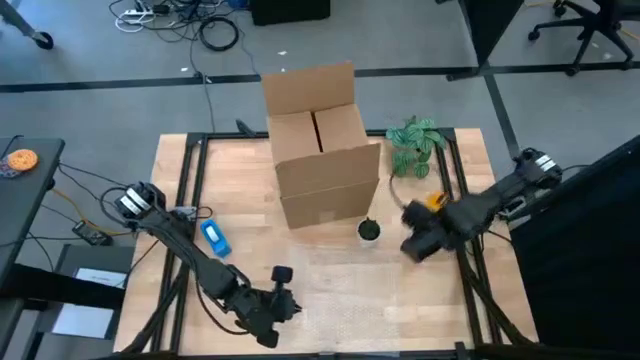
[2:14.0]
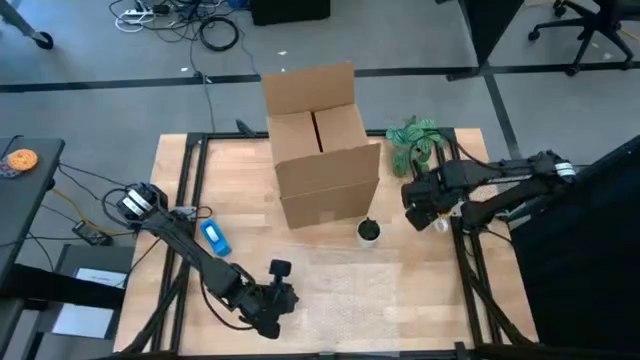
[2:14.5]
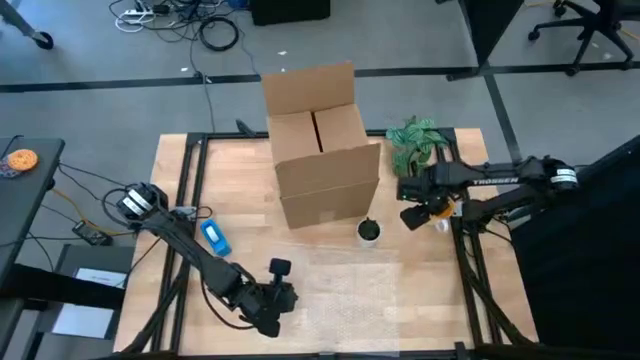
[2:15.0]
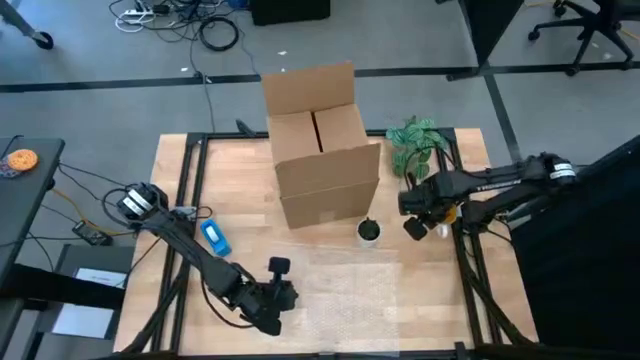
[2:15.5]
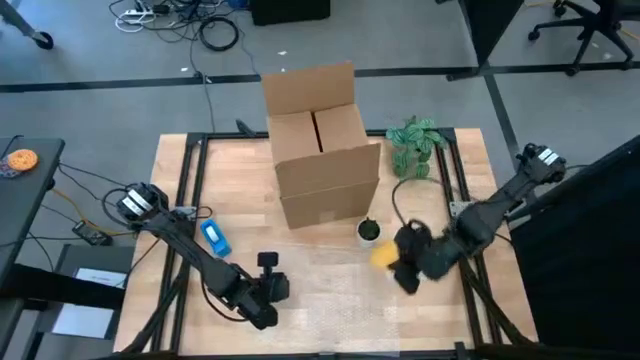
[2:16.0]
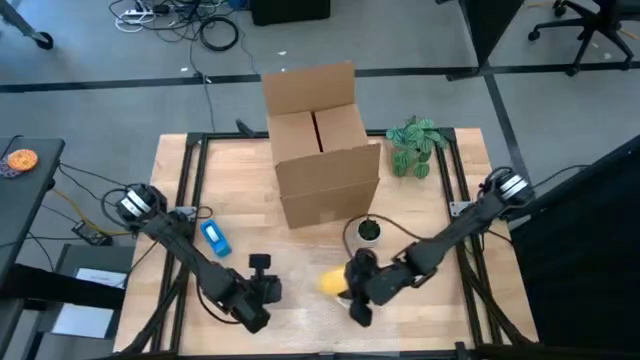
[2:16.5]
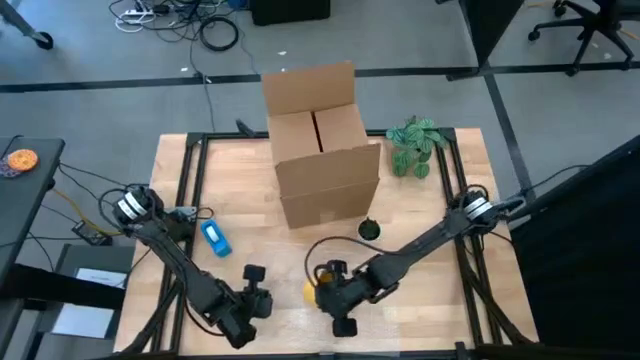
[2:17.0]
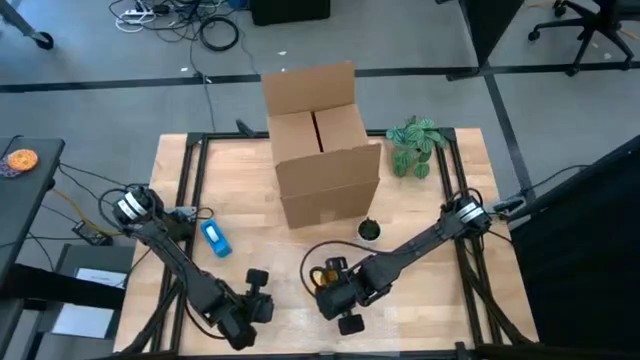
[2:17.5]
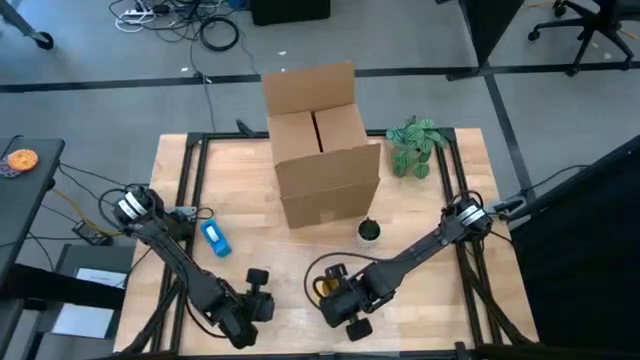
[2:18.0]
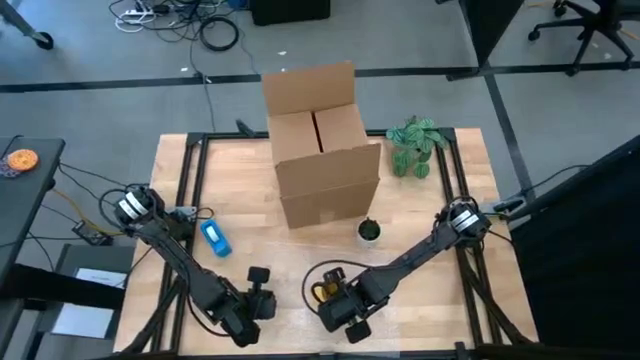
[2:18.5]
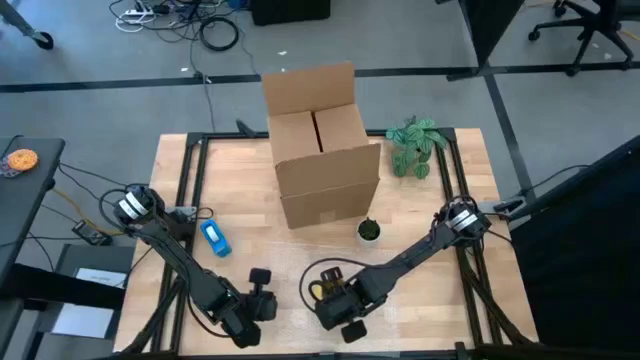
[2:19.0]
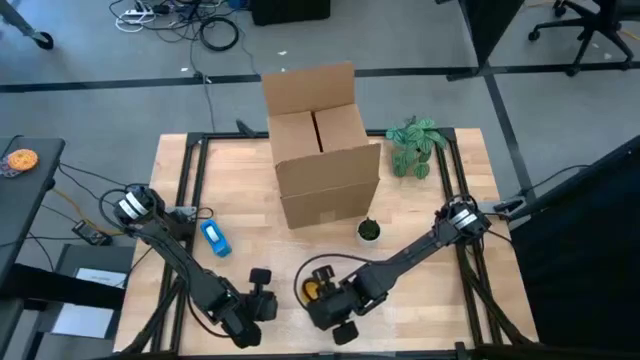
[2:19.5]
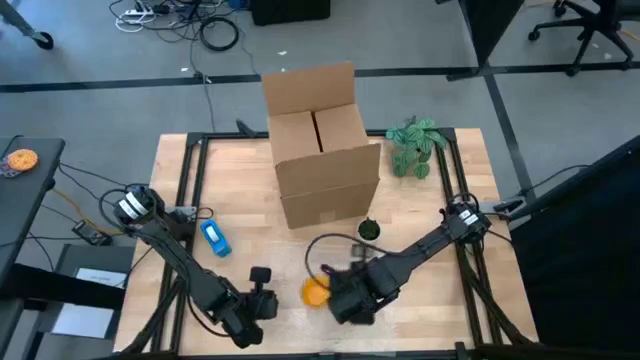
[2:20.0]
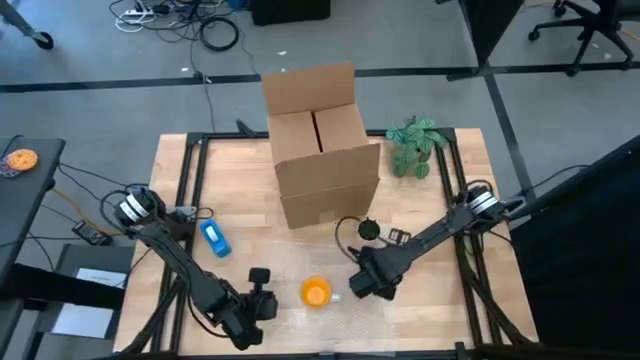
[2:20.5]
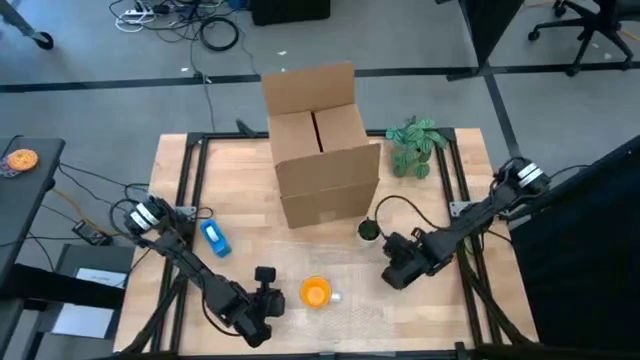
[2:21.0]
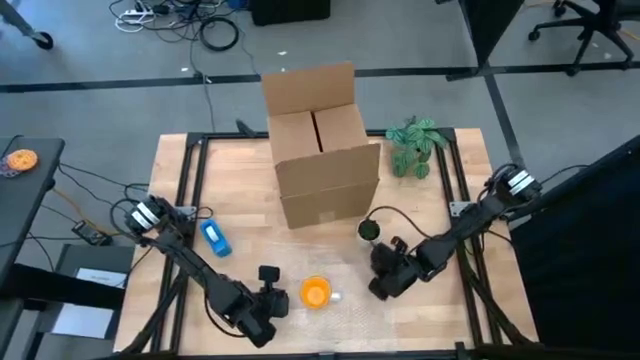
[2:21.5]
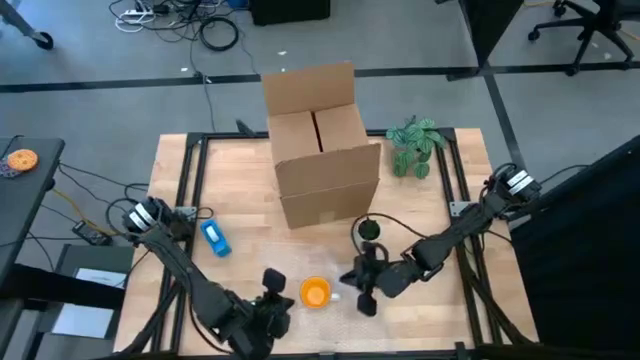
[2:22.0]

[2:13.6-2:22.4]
Task: wrap mug
Wrap the yellow mug with the transparent bubble wrap
